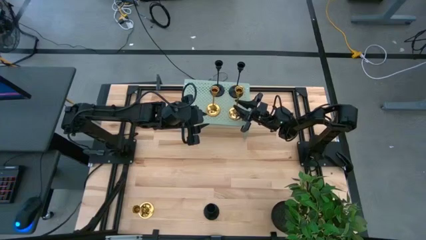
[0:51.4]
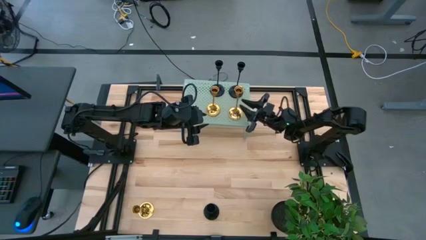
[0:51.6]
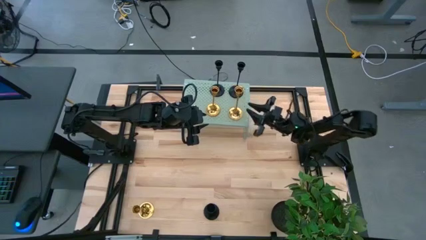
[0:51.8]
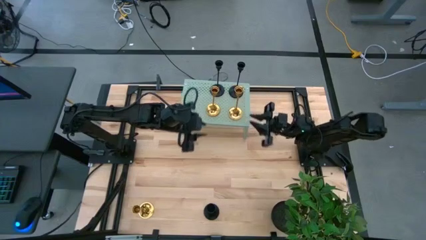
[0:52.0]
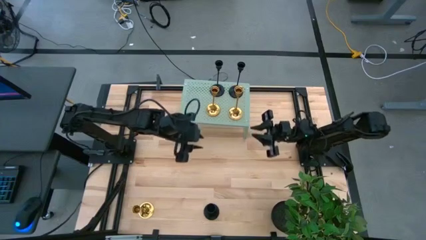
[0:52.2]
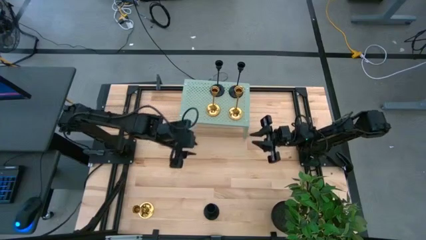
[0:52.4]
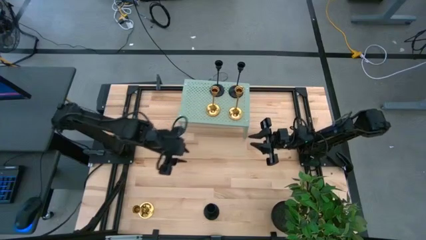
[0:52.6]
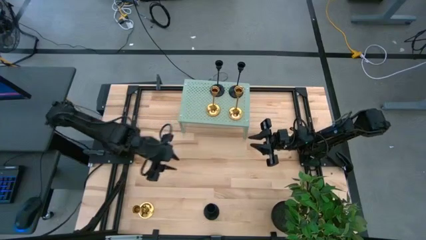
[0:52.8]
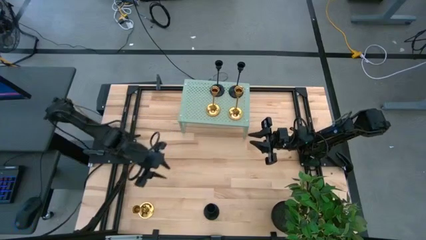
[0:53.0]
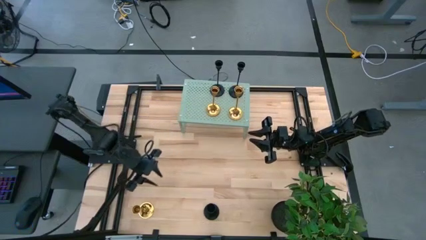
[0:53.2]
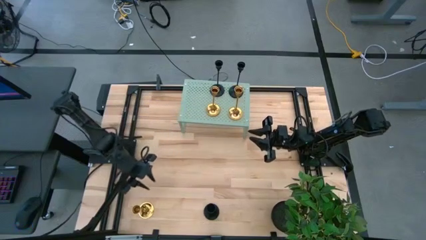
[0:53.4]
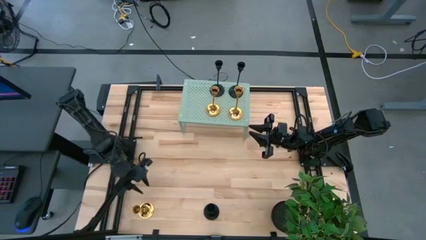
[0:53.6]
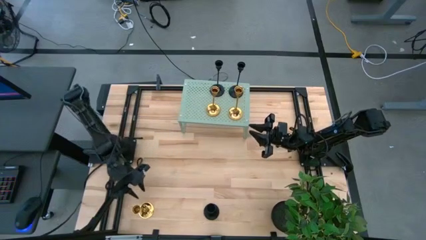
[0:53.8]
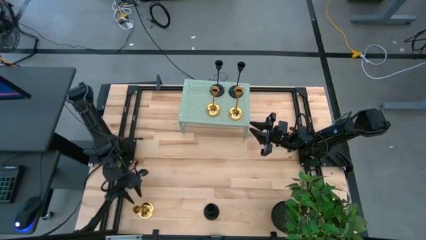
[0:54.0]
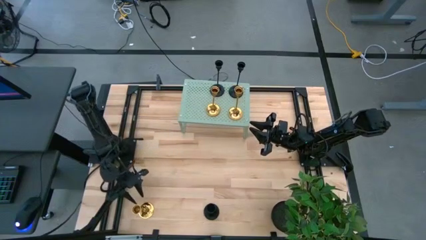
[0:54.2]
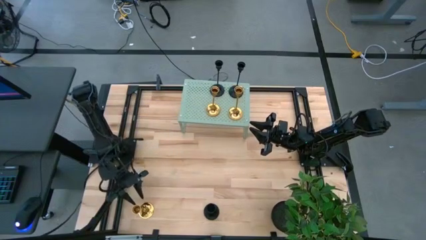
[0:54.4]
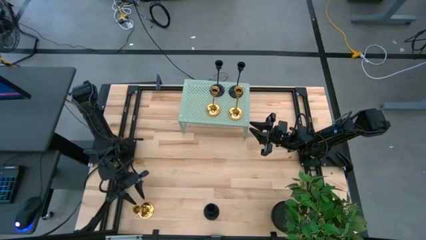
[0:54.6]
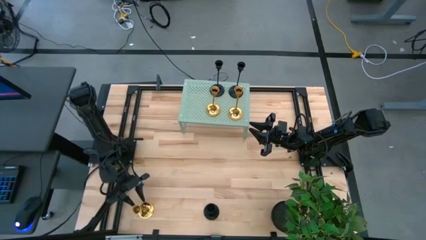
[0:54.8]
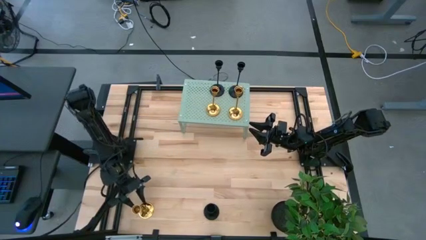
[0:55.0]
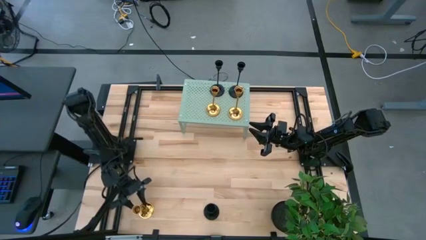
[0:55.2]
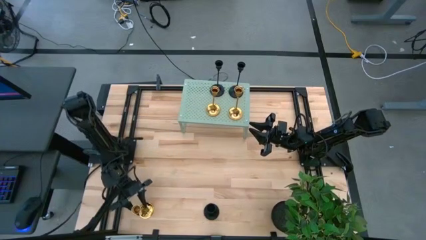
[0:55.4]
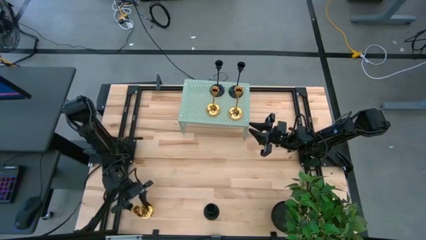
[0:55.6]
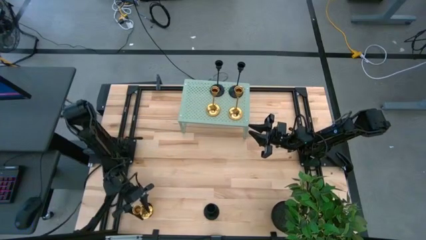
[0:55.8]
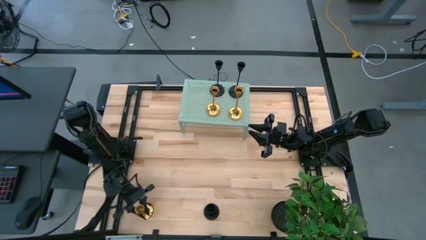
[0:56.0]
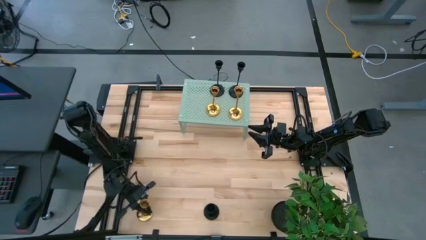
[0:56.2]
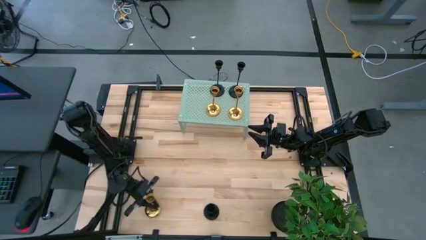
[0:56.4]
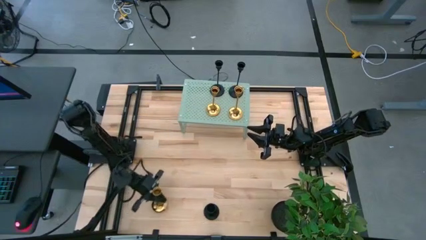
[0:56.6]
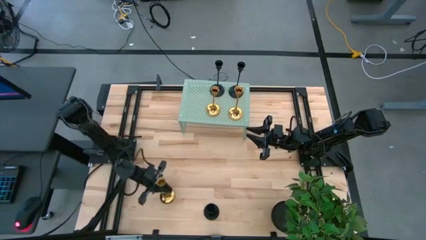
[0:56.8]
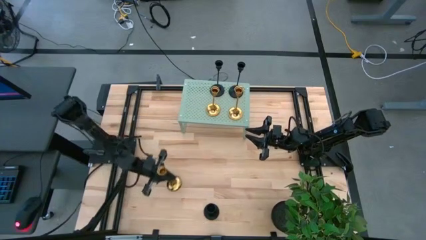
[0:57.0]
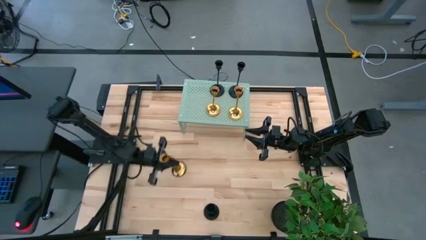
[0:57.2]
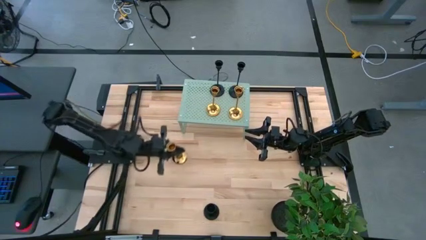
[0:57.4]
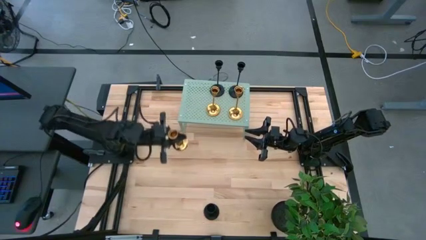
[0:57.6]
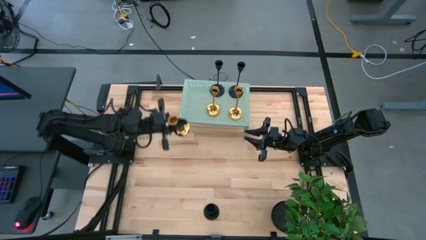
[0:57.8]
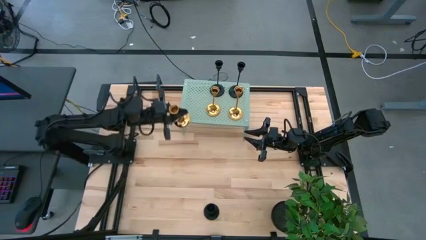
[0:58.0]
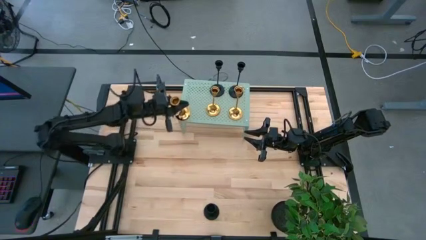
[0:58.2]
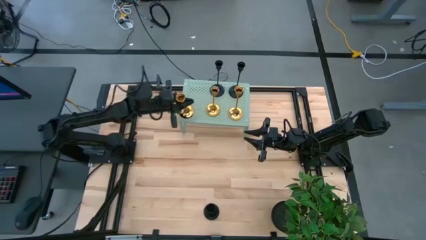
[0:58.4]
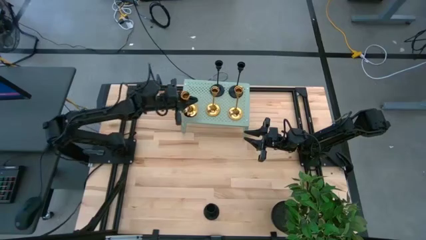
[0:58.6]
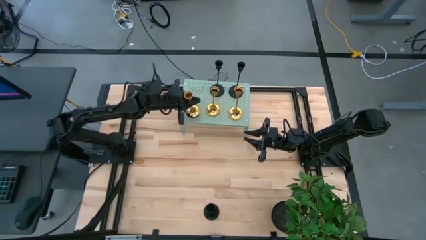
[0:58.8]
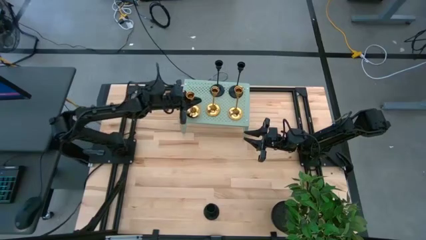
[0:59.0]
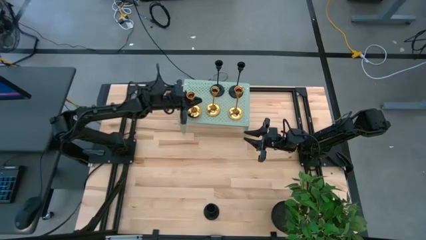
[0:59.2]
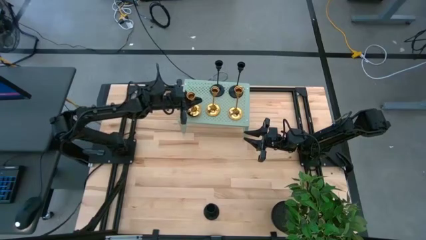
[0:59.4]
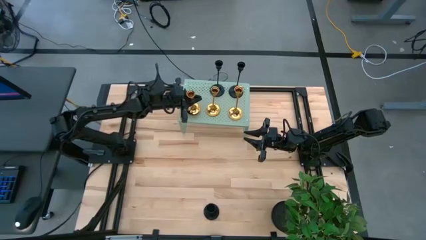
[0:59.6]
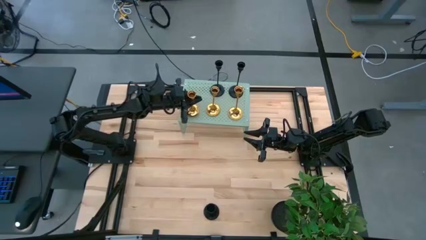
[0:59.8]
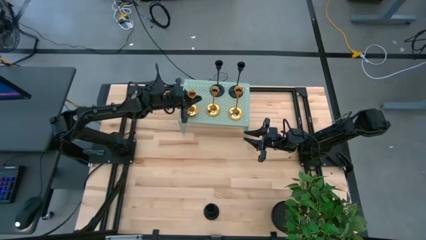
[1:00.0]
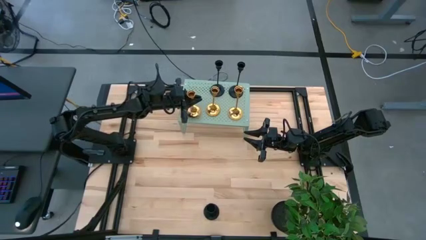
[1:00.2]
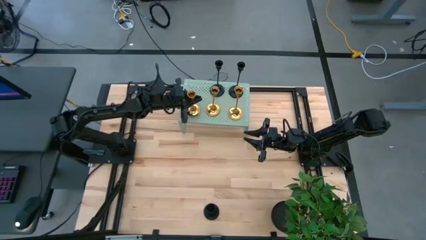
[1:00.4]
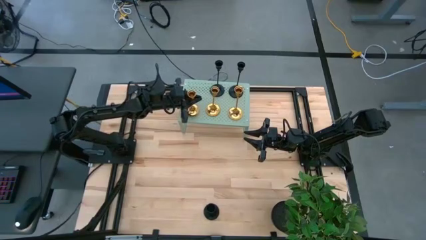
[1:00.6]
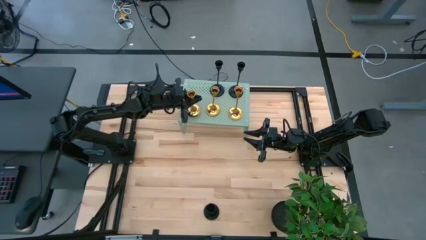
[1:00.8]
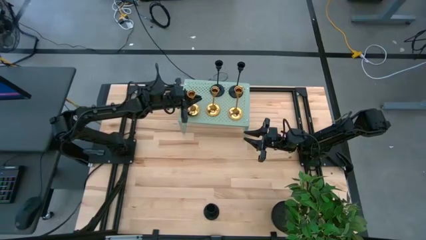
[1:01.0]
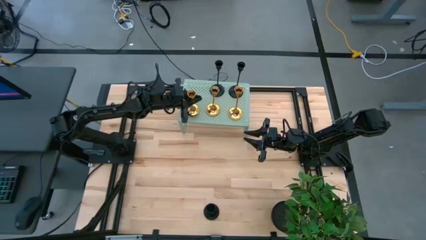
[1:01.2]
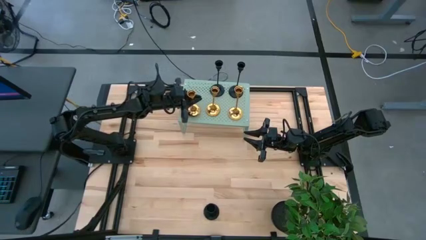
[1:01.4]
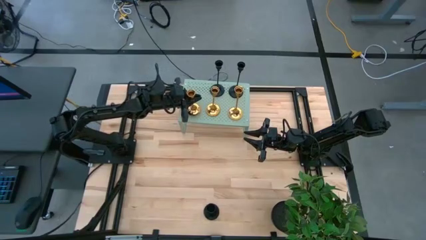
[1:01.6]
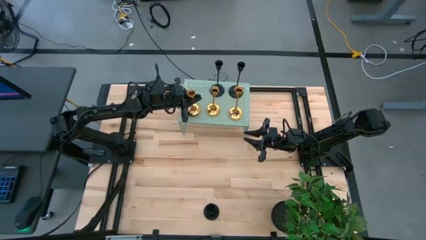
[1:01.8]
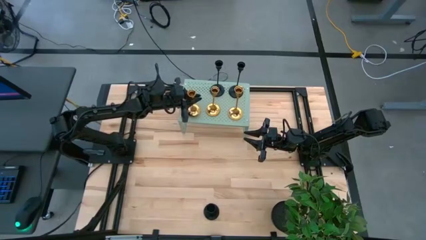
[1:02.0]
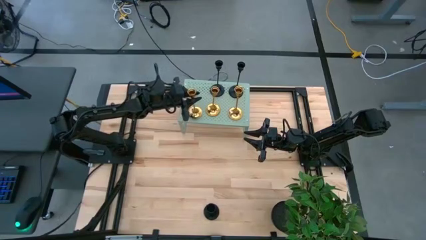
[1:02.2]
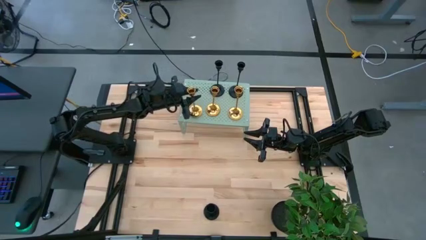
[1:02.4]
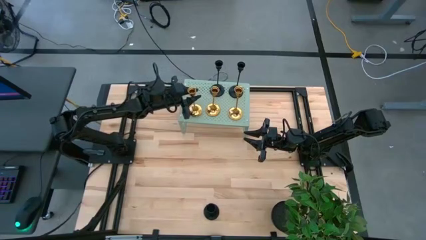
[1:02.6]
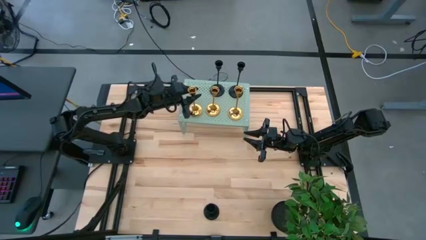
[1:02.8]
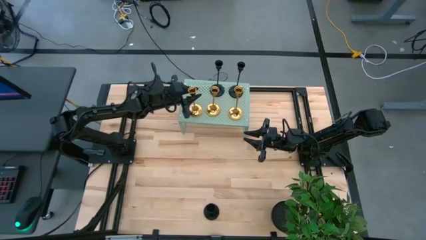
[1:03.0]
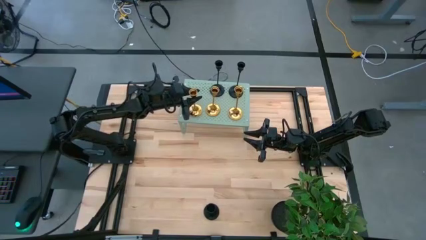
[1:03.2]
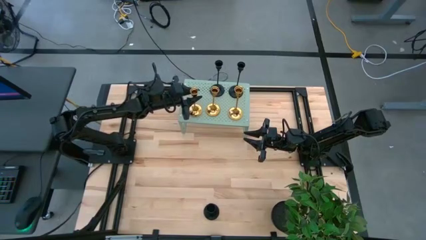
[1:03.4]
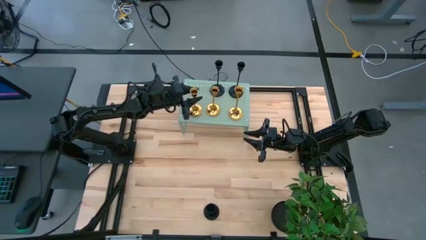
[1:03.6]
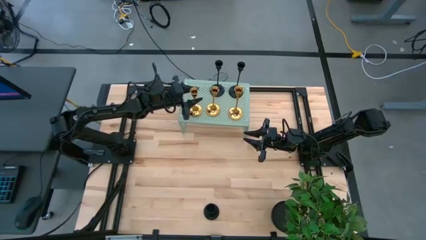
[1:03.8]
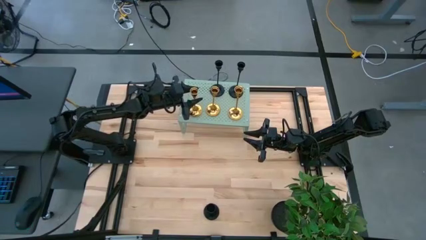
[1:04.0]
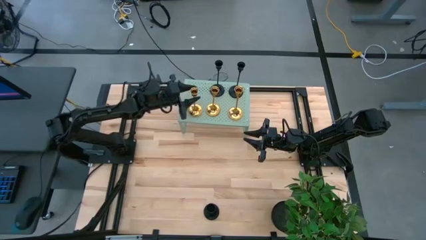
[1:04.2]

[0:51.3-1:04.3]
Task: Pick & Place candle stick holders
Put the gold candle holder on the shelf aligned with the other gold candle holders

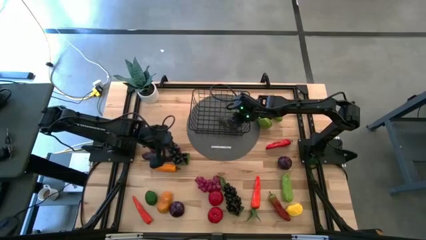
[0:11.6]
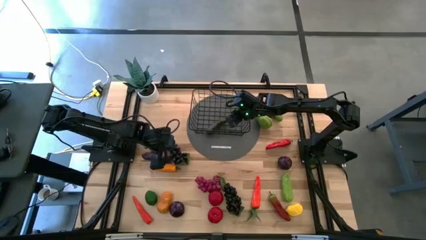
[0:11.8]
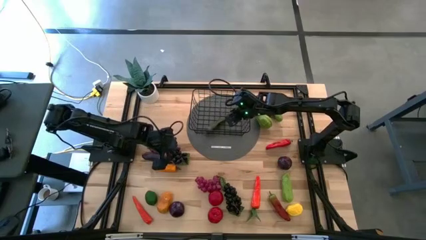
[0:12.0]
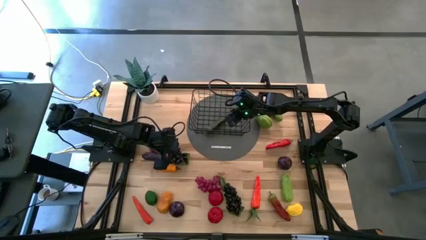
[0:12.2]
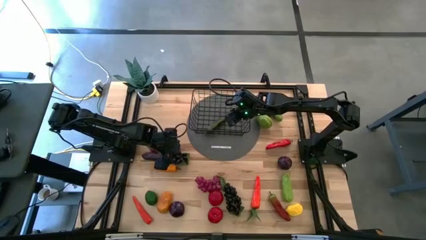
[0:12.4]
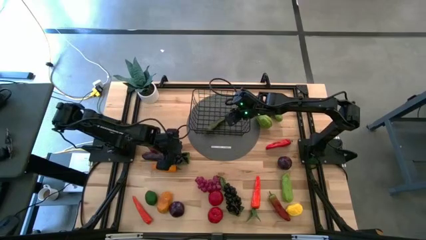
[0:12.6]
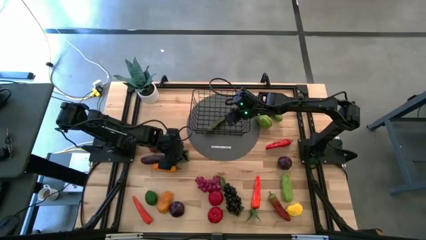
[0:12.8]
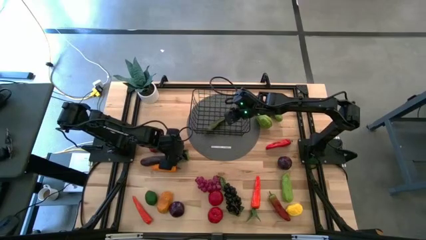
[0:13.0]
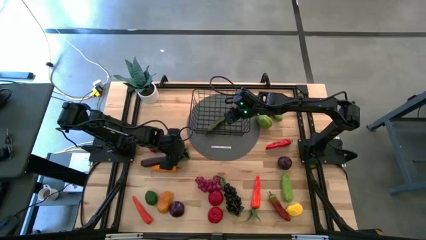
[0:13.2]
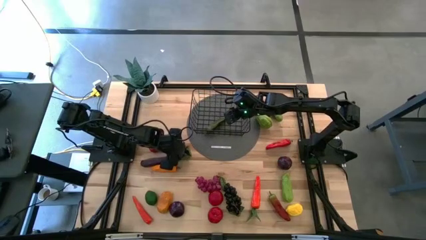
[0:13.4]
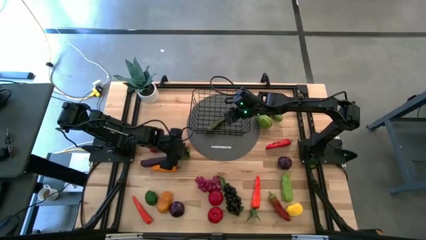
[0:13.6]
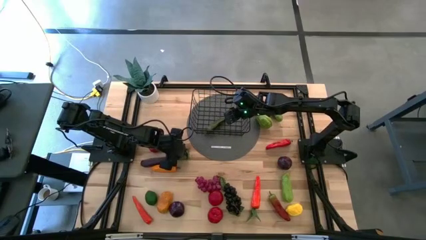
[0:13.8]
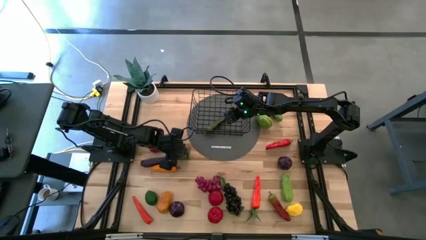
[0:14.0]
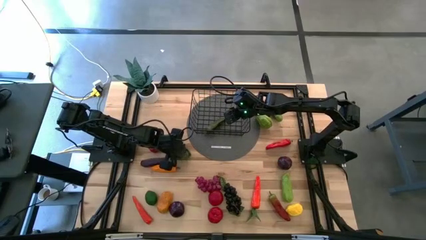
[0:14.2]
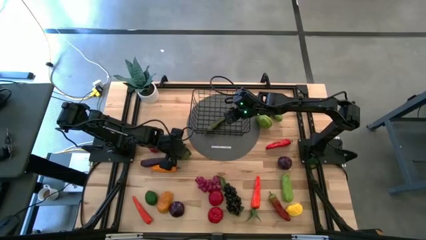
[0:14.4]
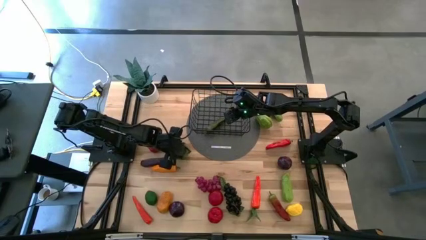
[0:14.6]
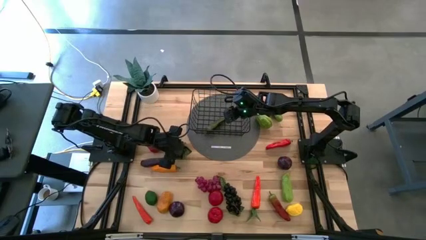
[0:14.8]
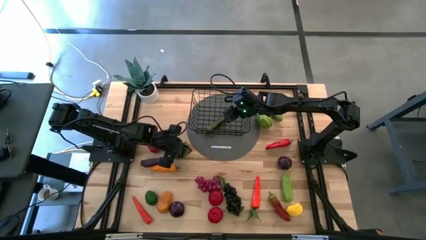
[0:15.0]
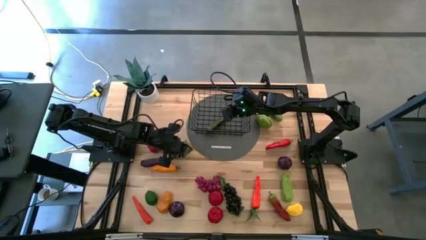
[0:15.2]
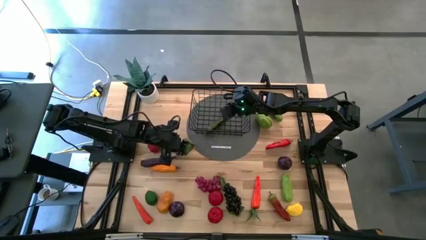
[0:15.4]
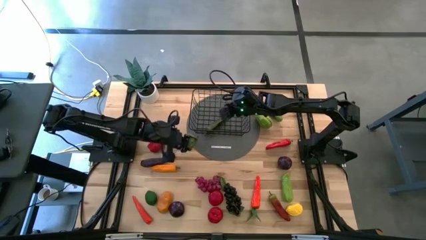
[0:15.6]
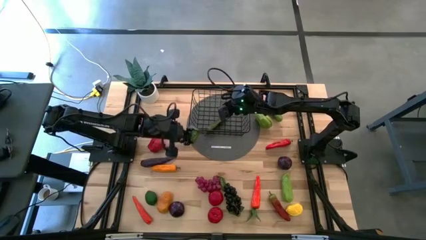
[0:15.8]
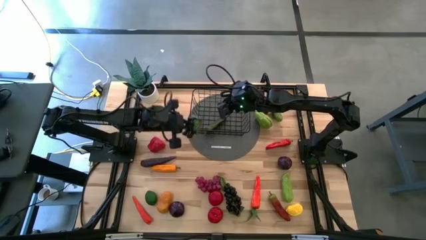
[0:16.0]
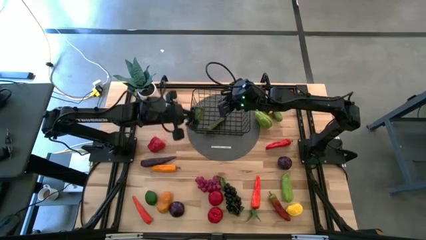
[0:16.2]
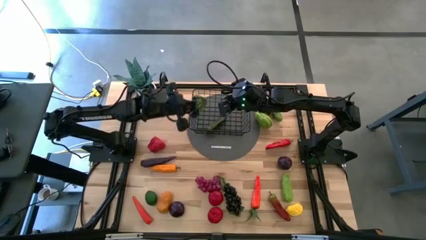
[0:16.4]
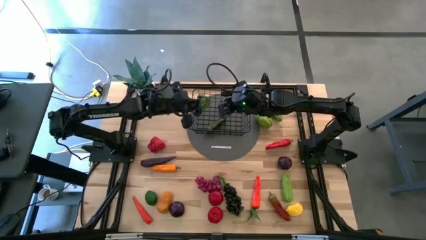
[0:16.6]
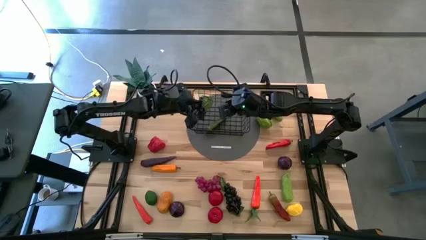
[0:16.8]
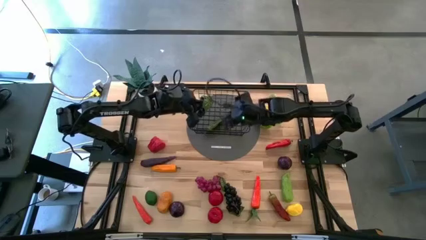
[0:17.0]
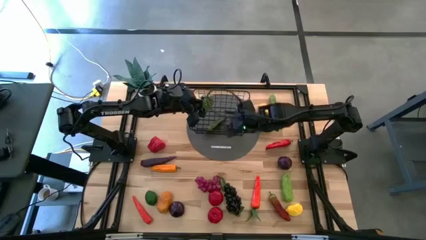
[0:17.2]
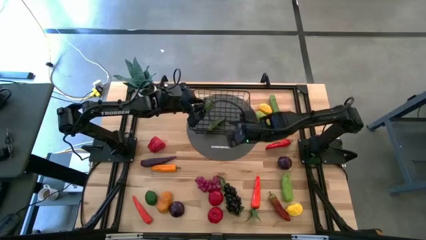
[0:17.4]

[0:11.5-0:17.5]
Task: Build produce basket
Put the top black grapes into the wire basket
